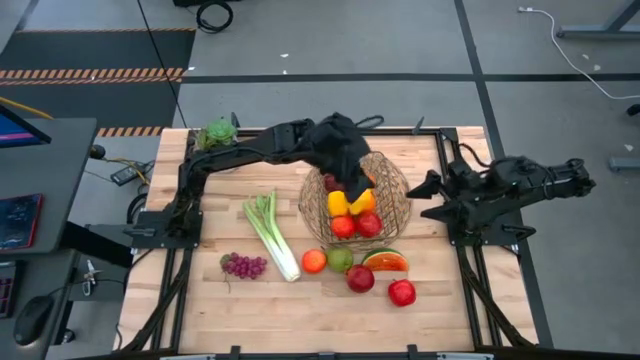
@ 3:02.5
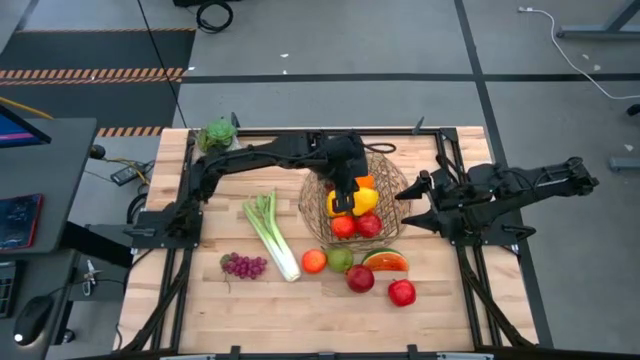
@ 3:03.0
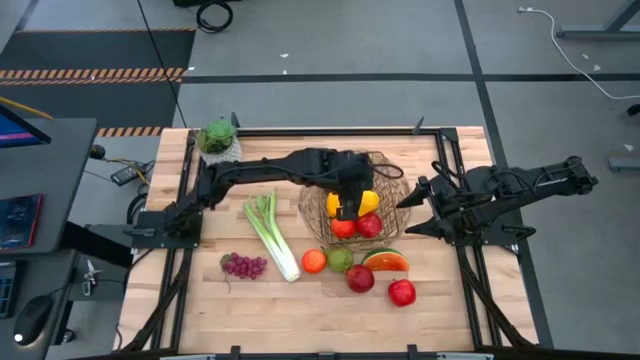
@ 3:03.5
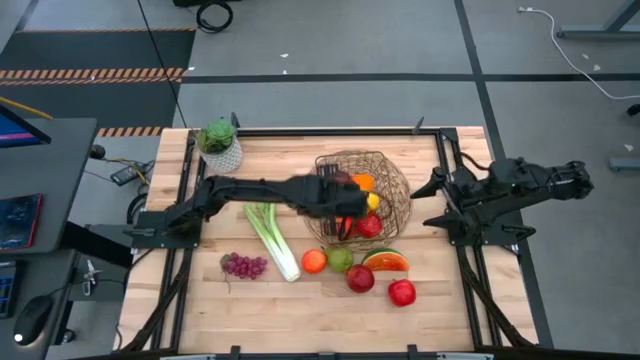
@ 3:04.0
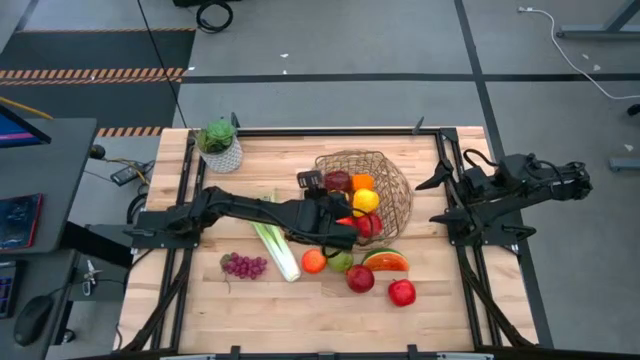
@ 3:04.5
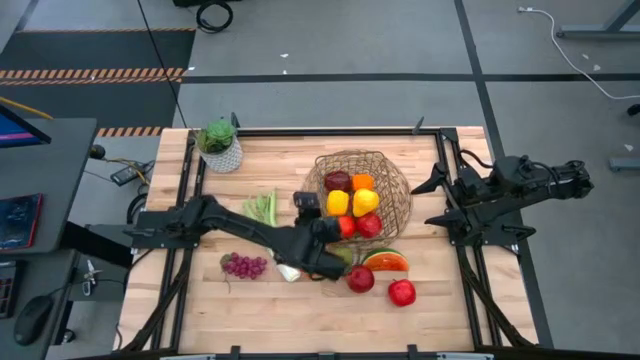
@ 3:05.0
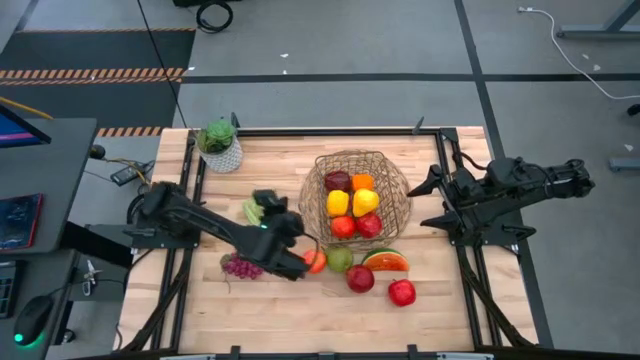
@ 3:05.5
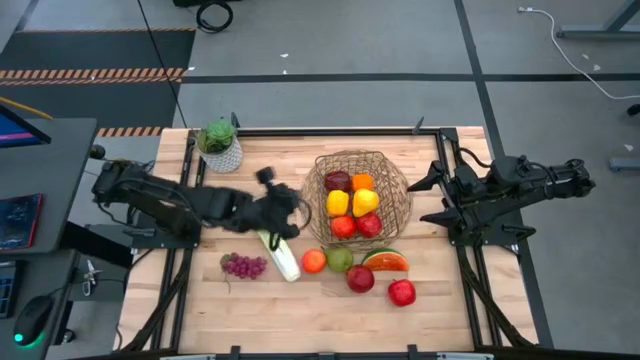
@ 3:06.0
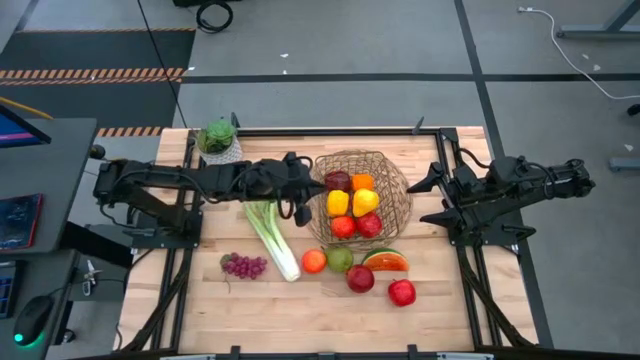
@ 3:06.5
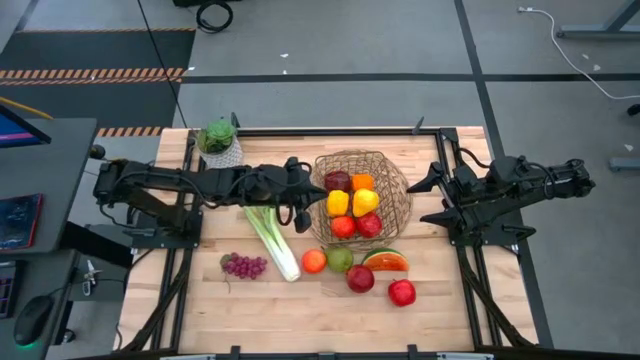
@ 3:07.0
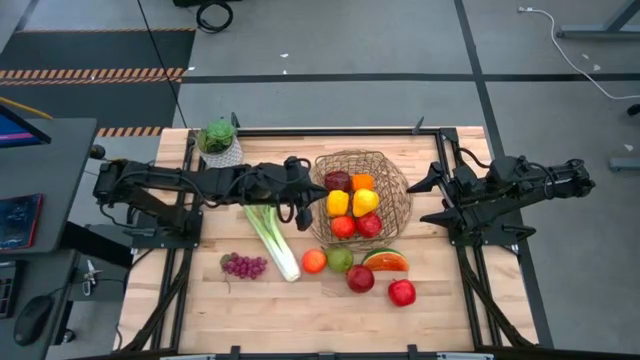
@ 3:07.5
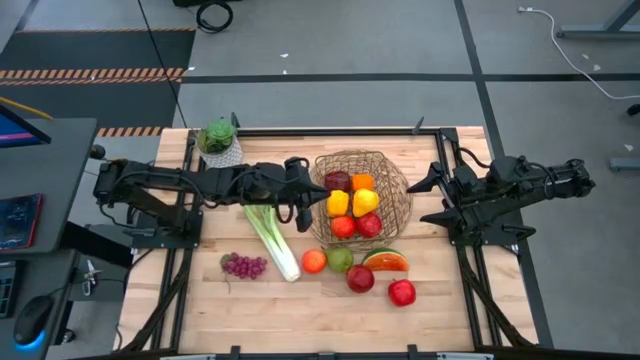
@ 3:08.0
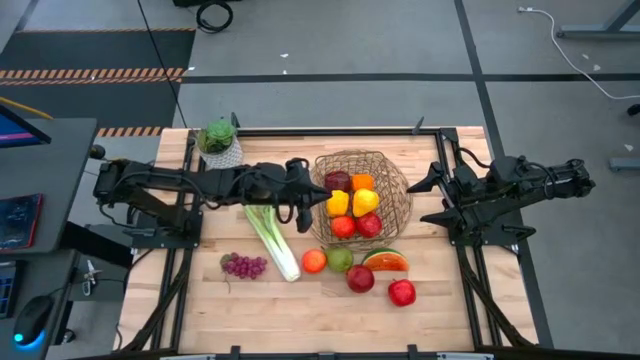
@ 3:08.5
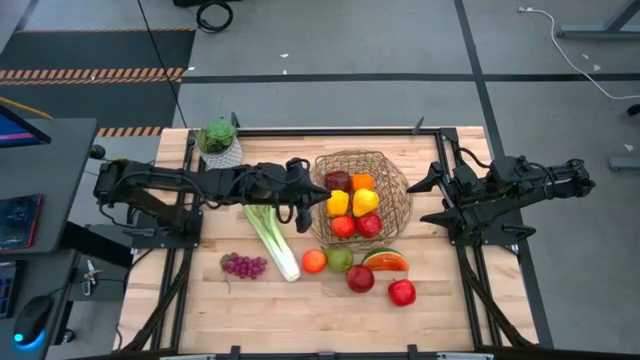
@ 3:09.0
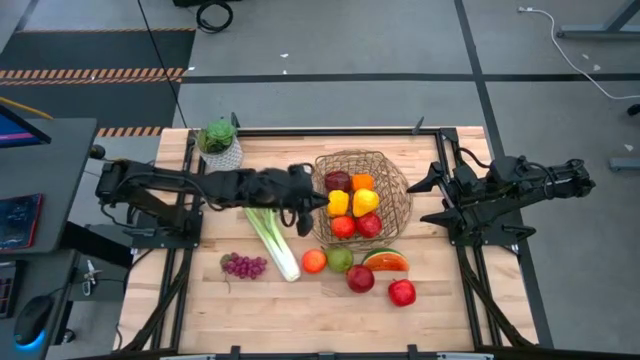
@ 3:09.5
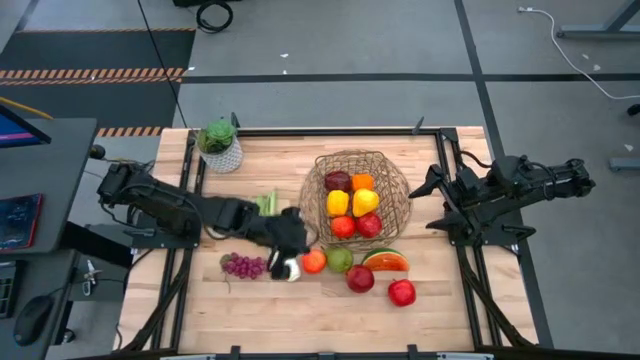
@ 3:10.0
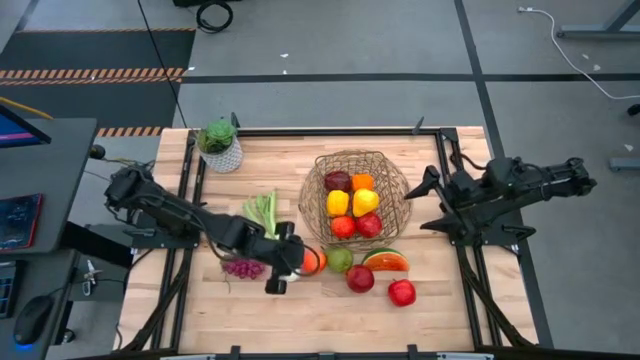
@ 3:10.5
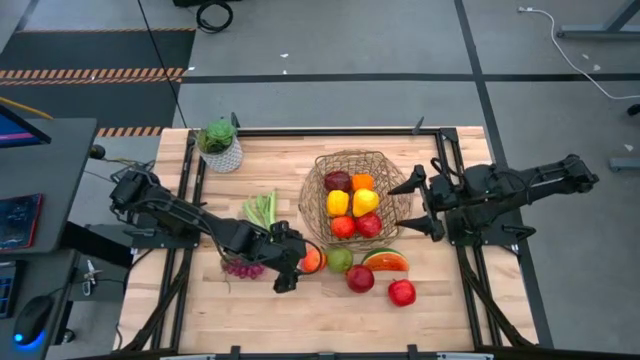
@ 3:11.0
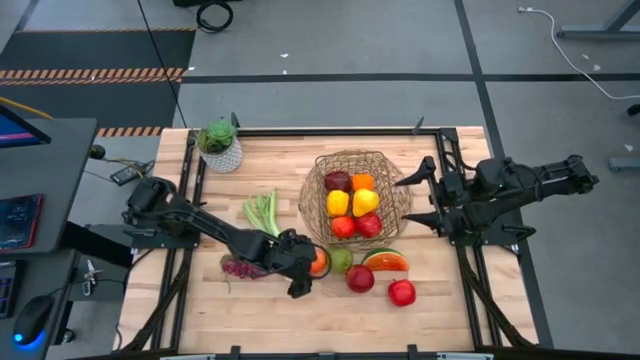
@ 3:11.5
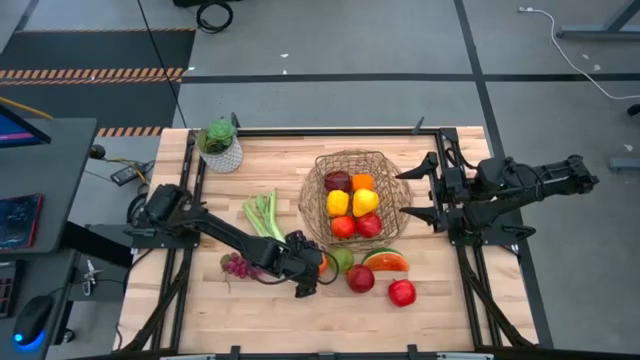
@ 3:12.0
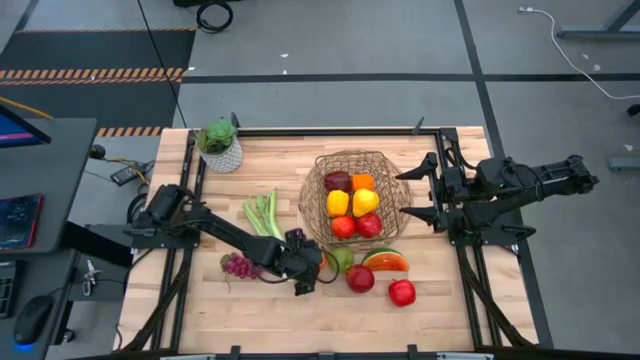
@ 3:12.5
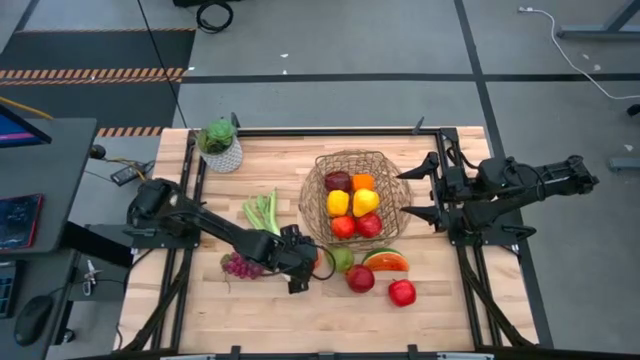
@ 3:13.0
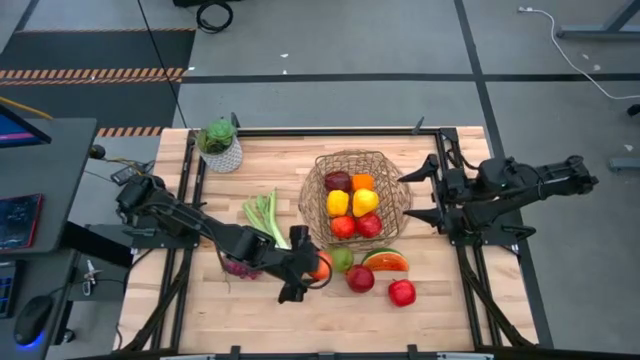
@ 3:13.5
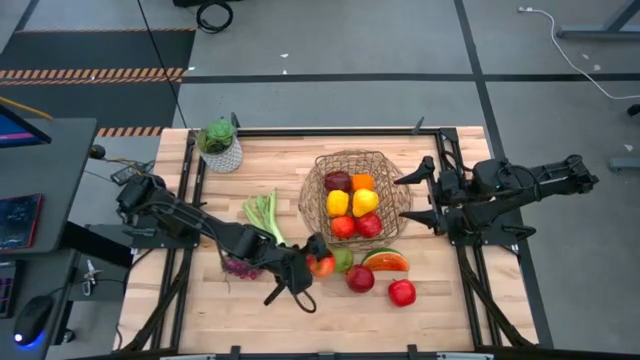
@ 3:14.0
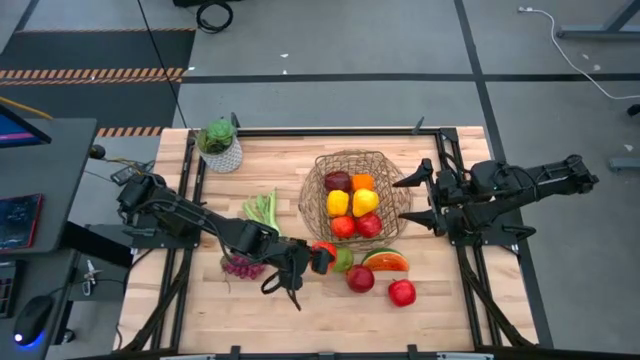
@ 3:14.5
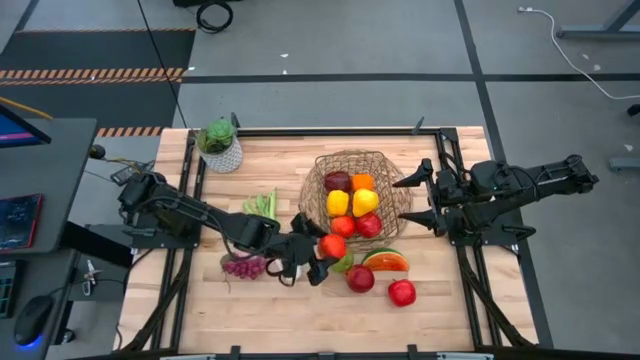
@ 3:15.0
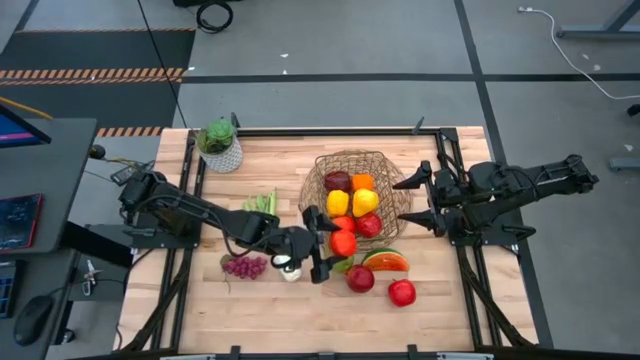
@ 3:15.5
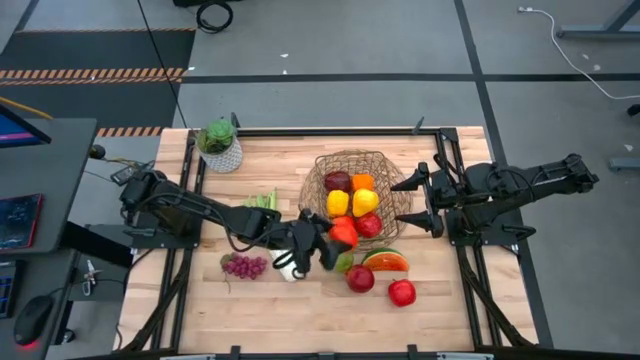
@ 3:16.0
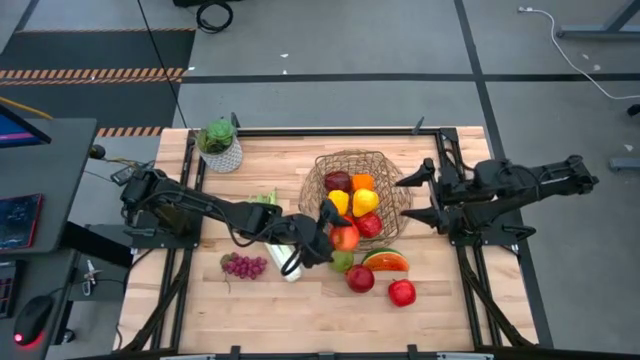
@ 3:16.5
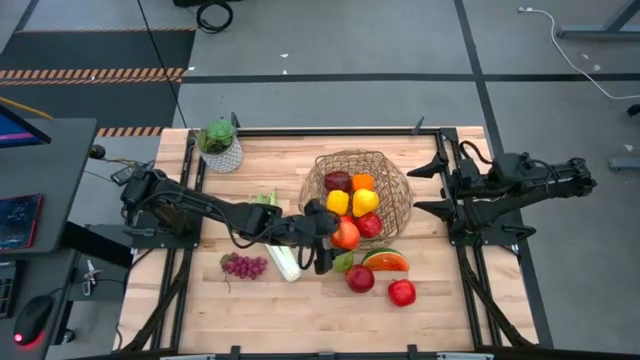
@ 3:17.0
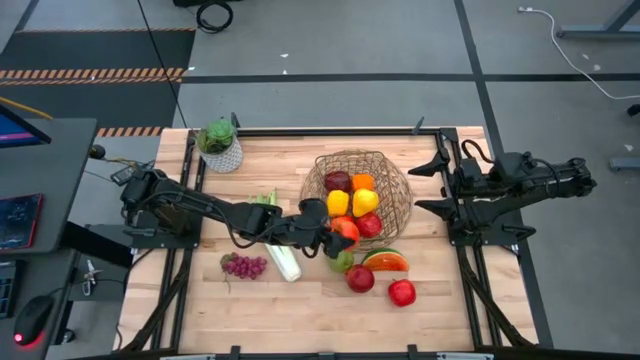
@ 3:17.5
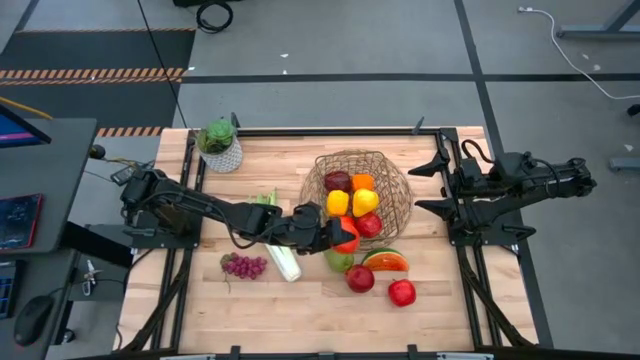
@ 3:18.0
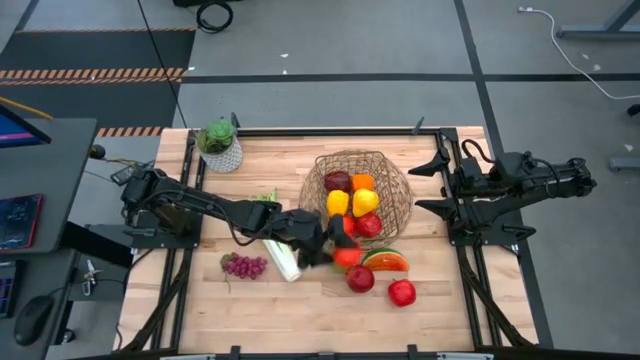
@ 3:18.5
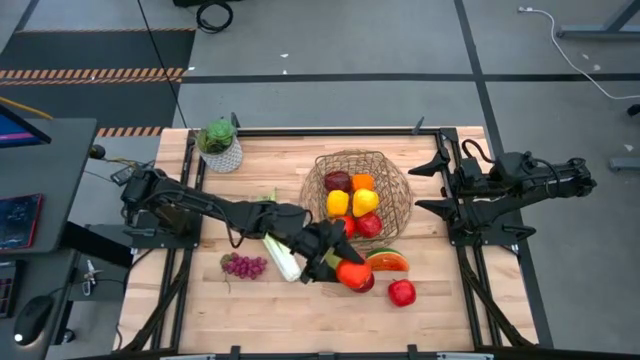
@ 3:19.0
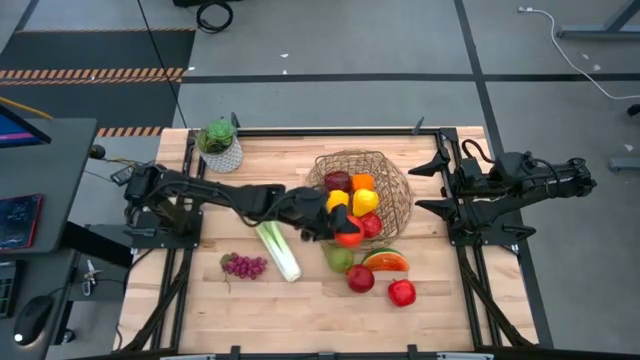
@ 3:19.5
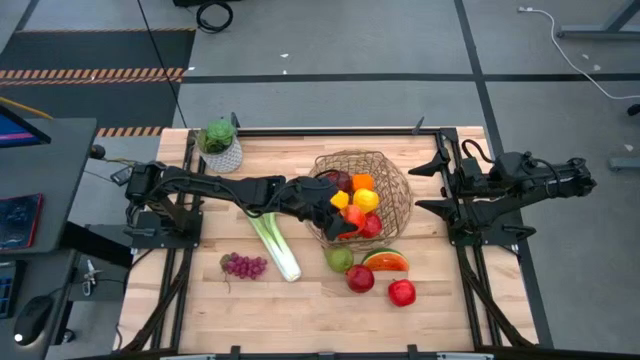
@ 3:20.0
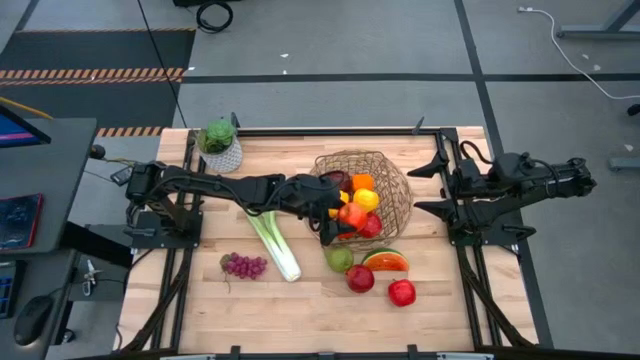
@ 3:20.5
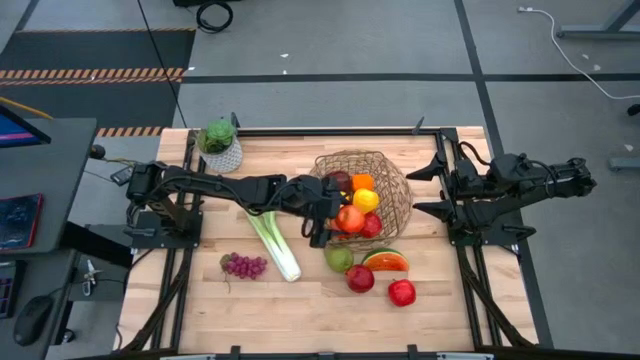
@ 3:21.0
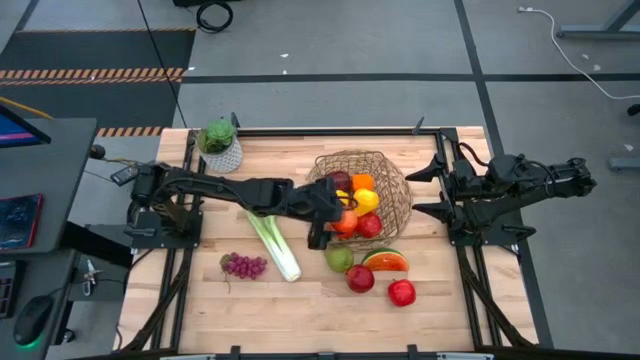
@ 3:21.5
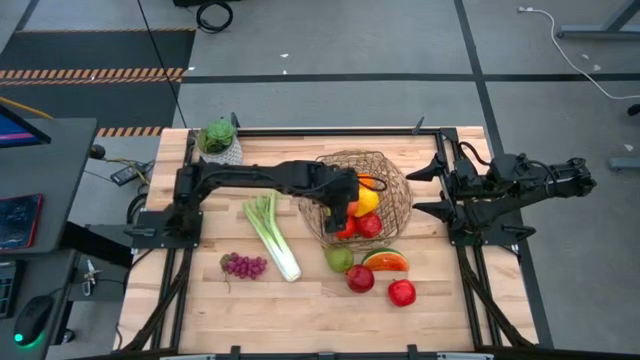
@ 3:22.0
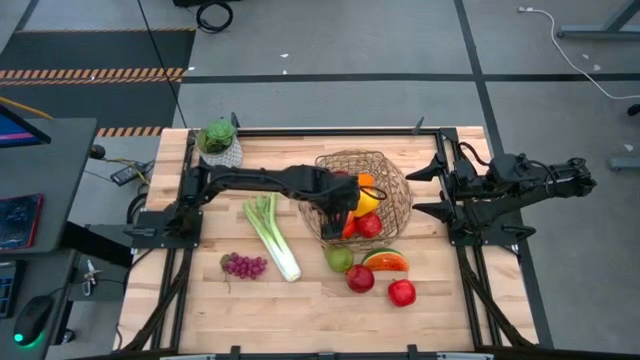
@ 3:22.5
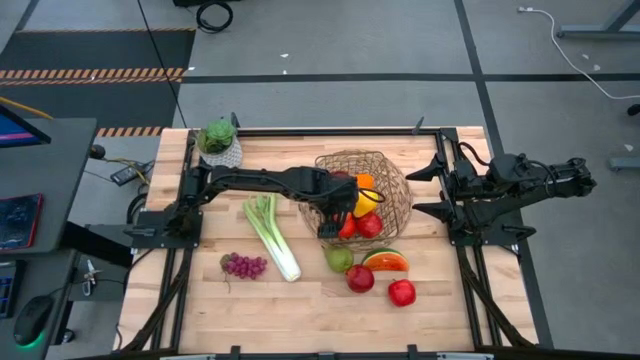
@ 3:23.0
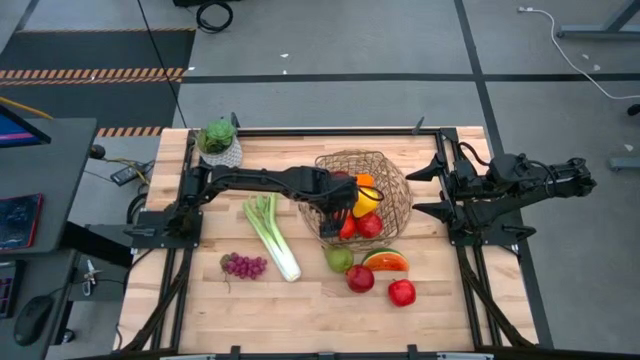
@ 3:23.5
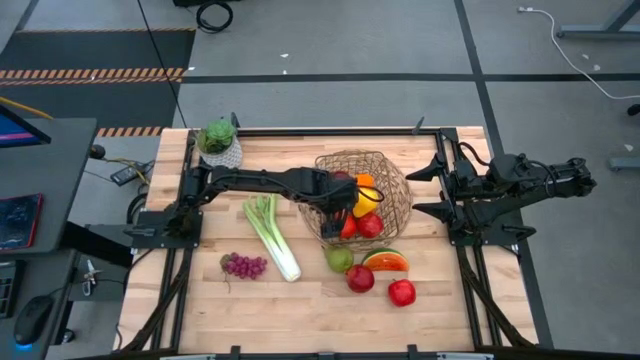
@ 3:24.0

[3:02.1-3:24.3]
Task: Build produce basket
Put the red apple into the brown wire basket
